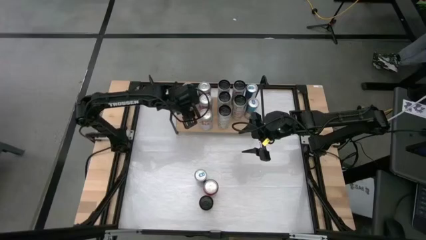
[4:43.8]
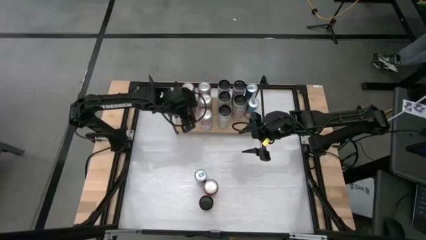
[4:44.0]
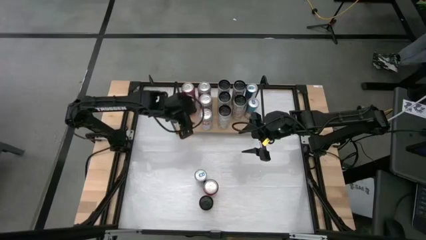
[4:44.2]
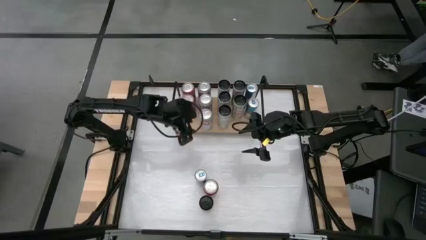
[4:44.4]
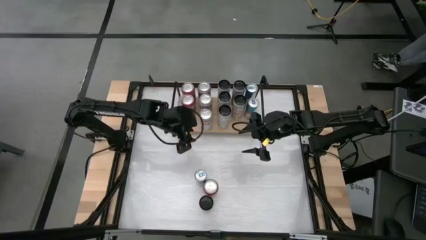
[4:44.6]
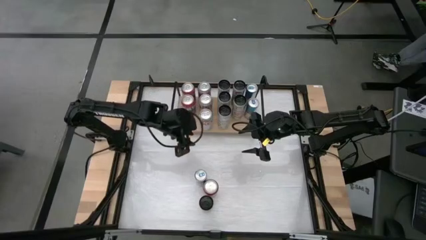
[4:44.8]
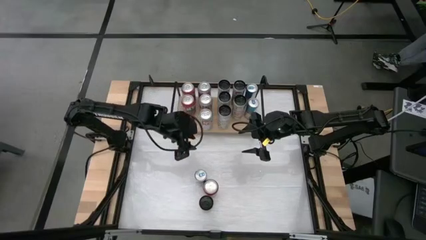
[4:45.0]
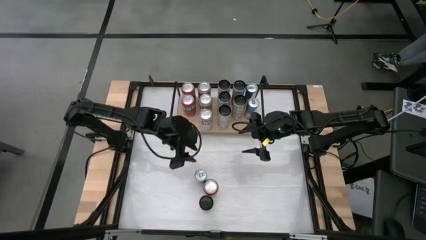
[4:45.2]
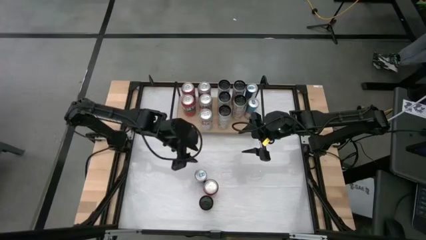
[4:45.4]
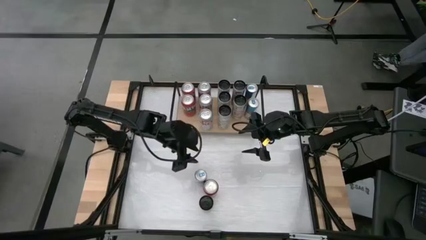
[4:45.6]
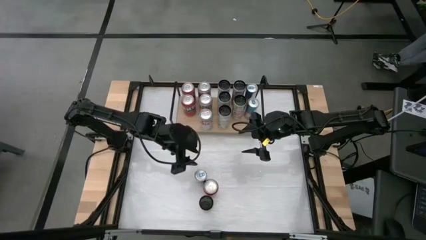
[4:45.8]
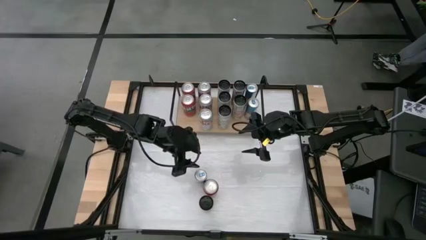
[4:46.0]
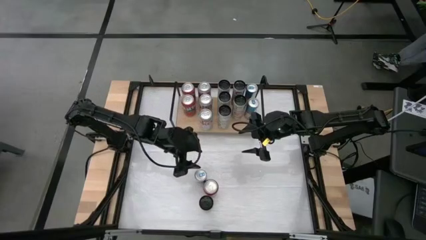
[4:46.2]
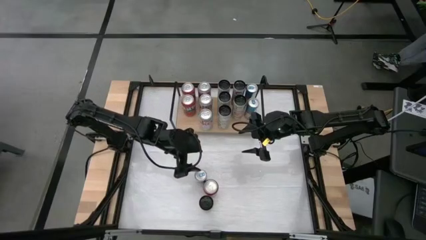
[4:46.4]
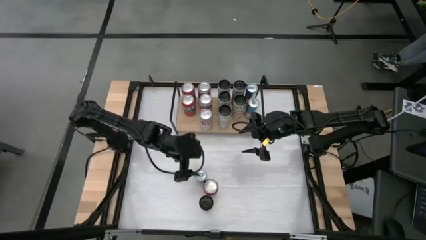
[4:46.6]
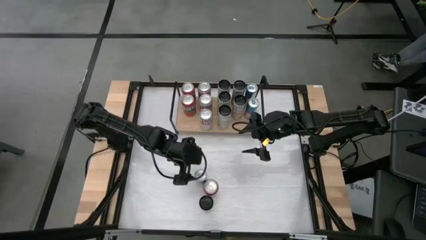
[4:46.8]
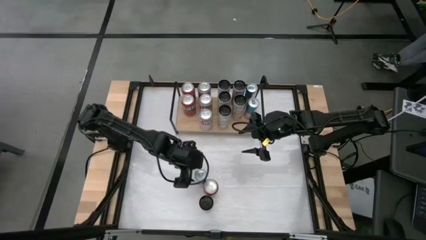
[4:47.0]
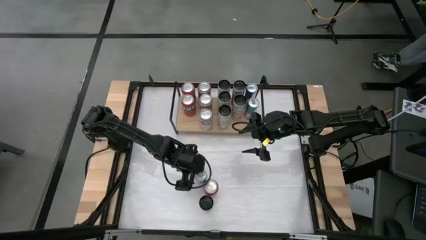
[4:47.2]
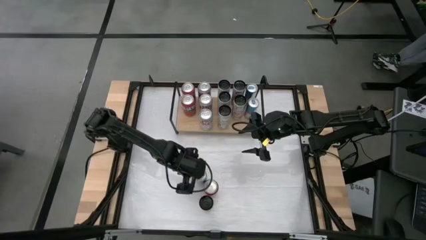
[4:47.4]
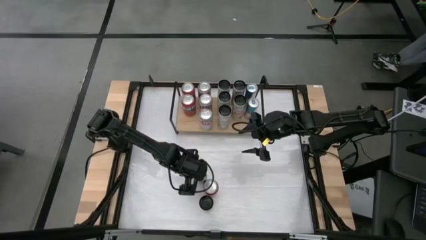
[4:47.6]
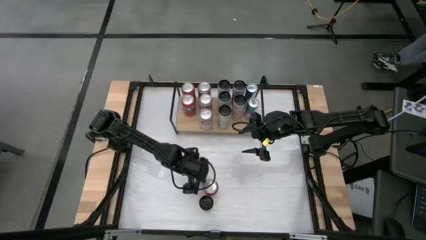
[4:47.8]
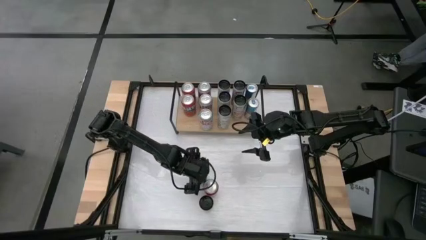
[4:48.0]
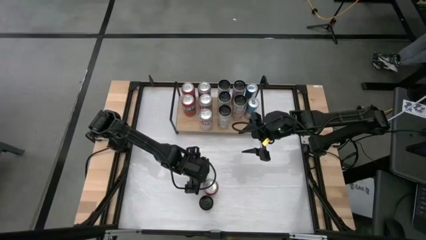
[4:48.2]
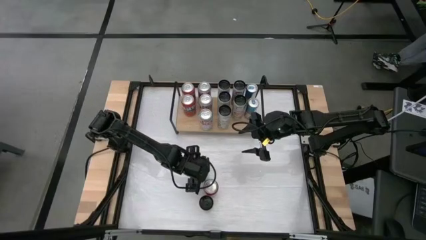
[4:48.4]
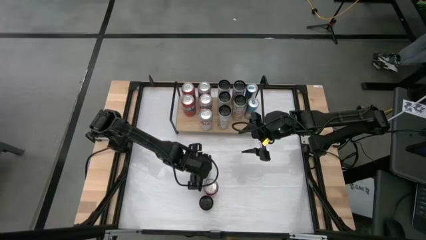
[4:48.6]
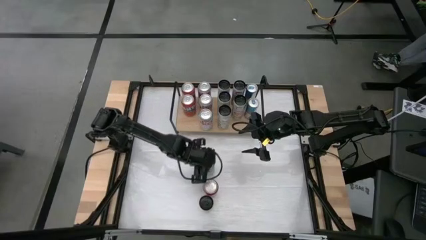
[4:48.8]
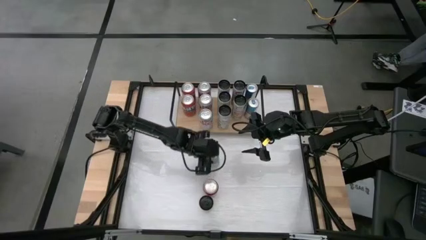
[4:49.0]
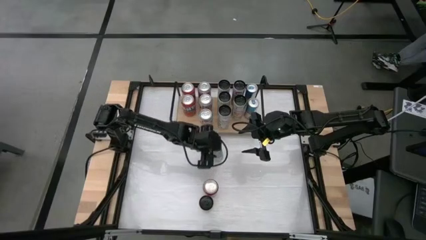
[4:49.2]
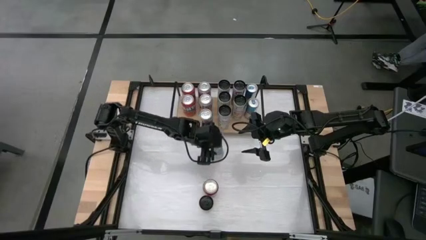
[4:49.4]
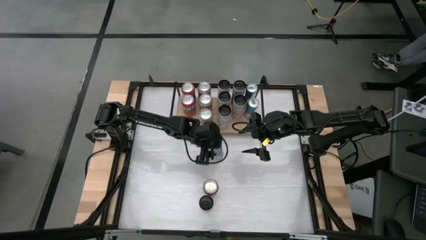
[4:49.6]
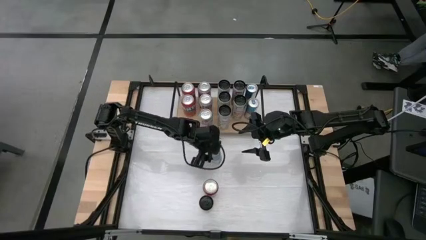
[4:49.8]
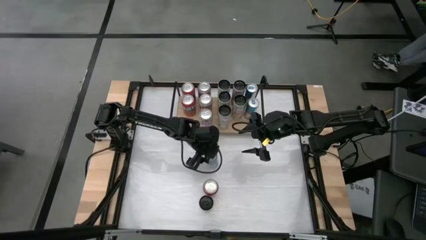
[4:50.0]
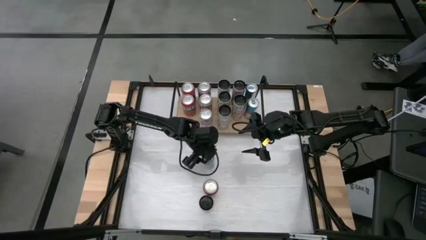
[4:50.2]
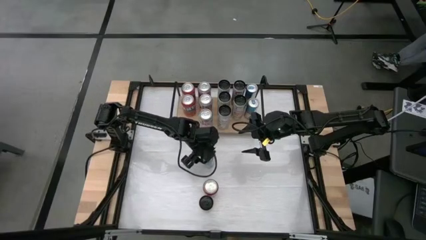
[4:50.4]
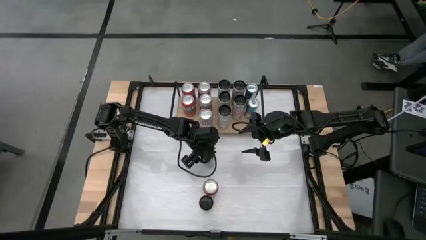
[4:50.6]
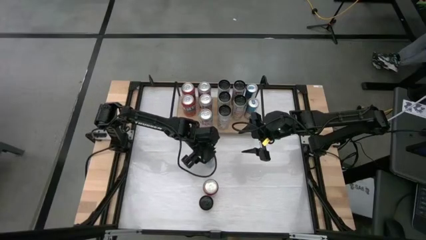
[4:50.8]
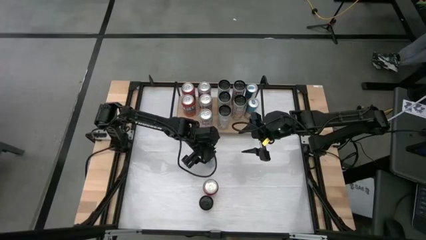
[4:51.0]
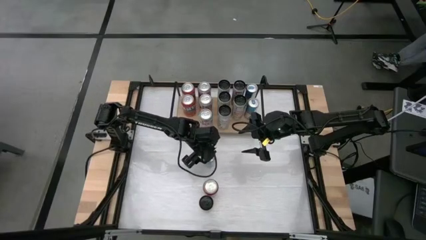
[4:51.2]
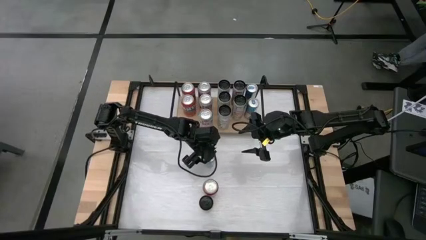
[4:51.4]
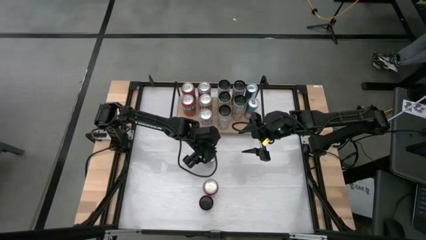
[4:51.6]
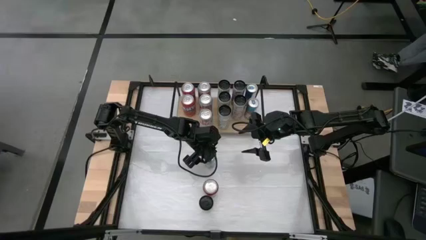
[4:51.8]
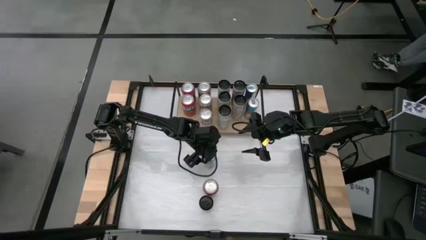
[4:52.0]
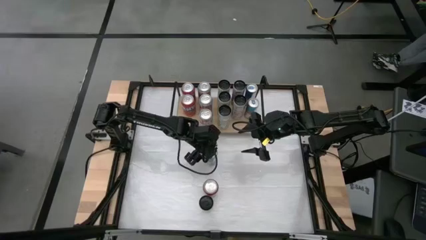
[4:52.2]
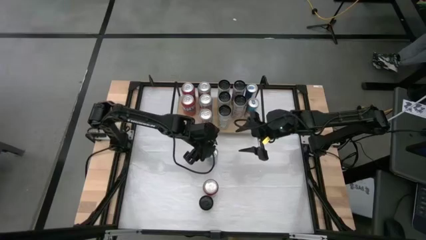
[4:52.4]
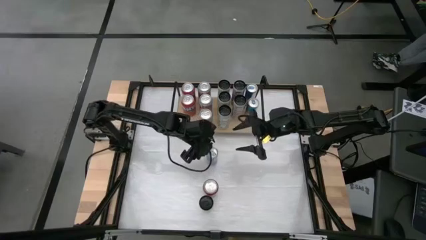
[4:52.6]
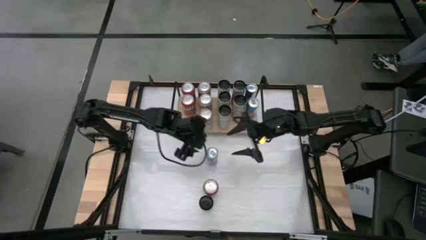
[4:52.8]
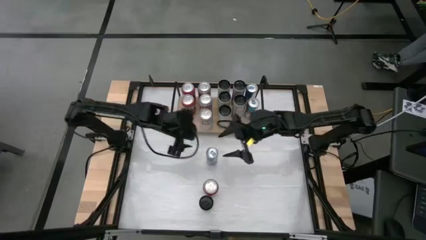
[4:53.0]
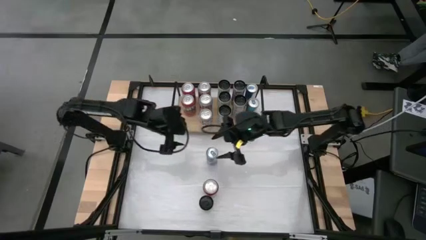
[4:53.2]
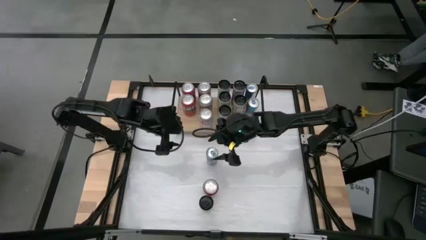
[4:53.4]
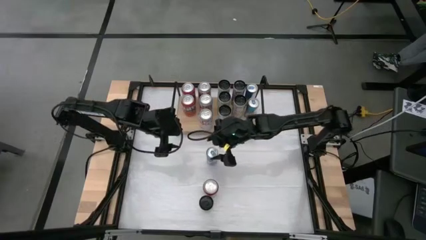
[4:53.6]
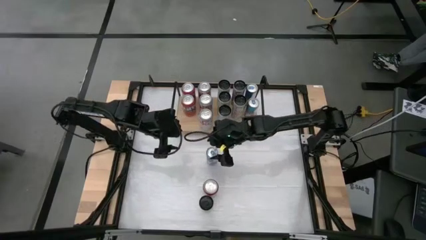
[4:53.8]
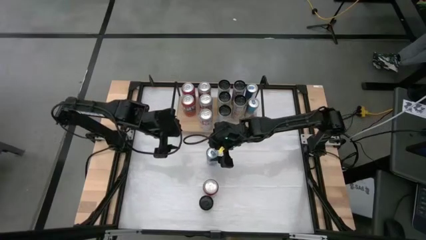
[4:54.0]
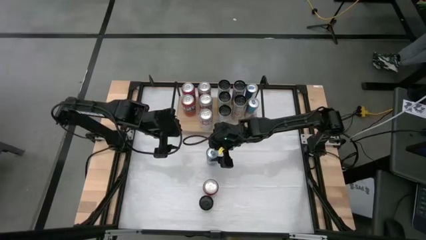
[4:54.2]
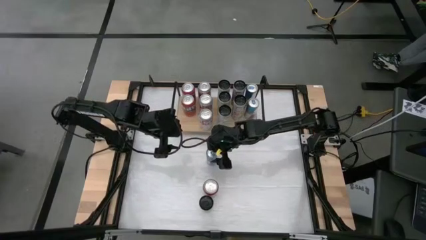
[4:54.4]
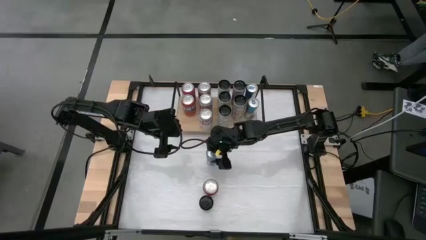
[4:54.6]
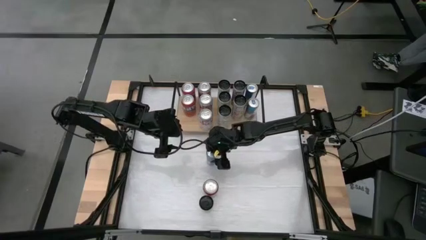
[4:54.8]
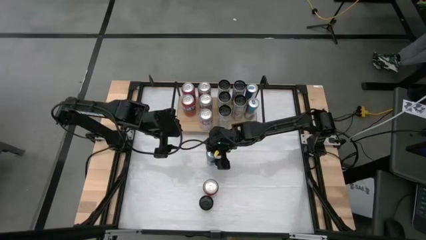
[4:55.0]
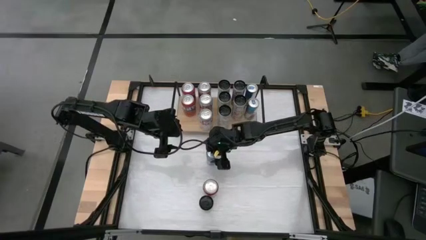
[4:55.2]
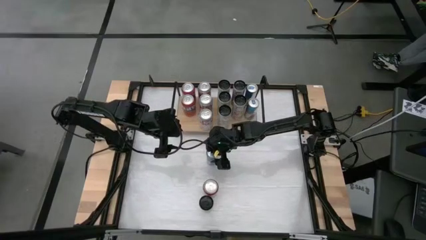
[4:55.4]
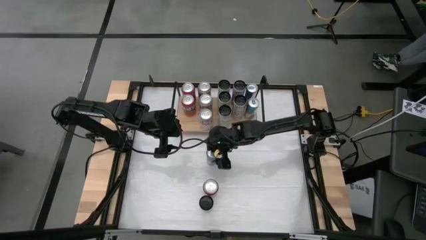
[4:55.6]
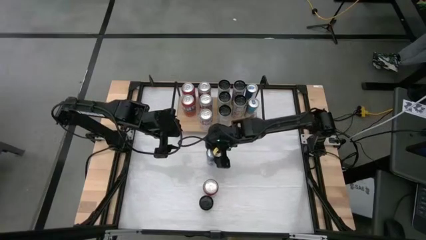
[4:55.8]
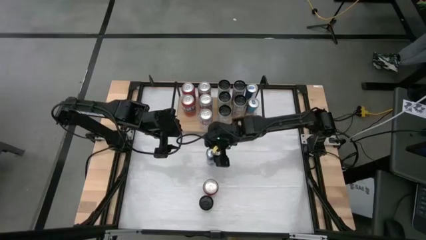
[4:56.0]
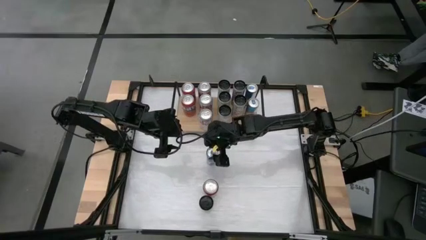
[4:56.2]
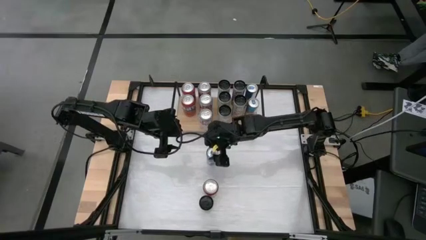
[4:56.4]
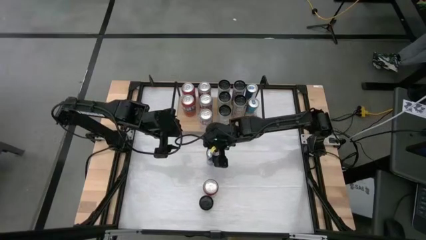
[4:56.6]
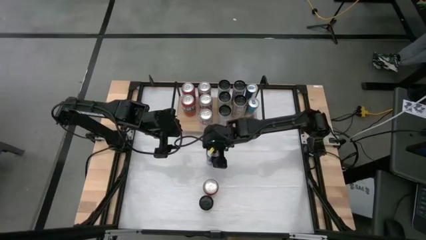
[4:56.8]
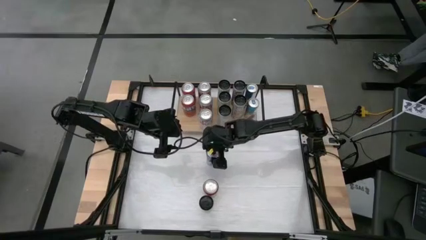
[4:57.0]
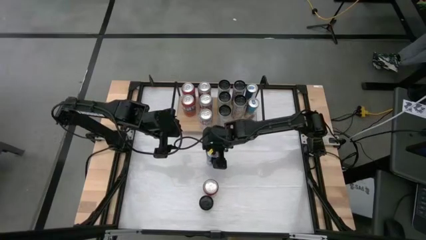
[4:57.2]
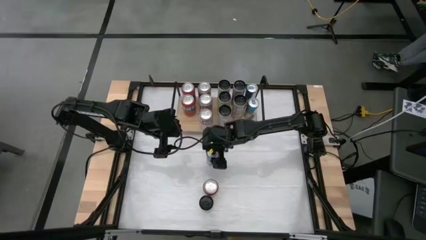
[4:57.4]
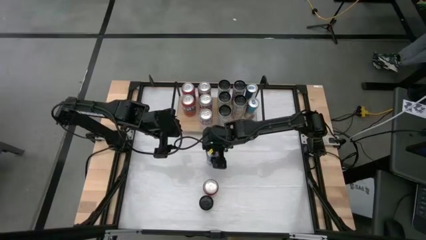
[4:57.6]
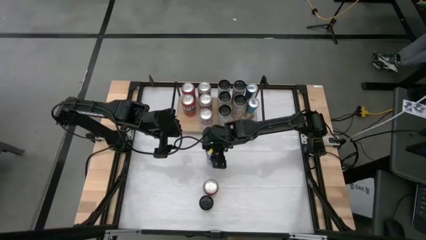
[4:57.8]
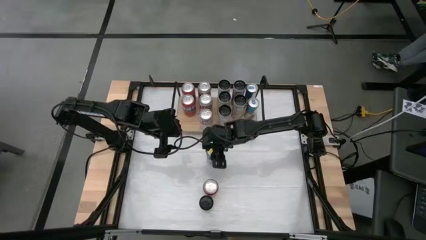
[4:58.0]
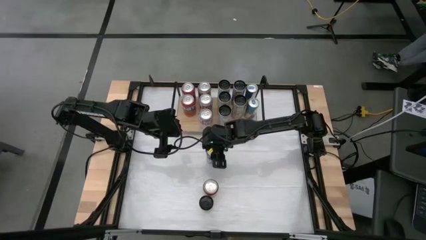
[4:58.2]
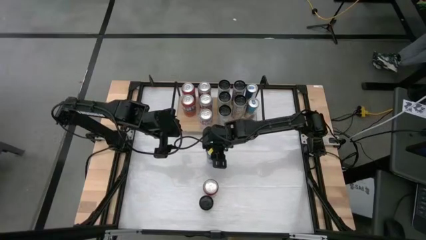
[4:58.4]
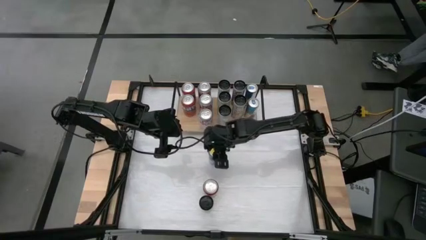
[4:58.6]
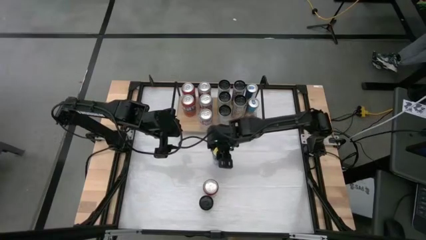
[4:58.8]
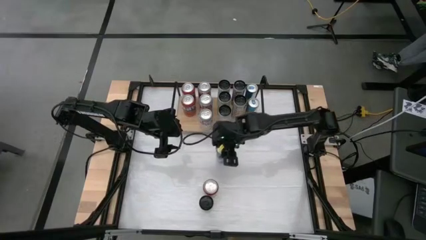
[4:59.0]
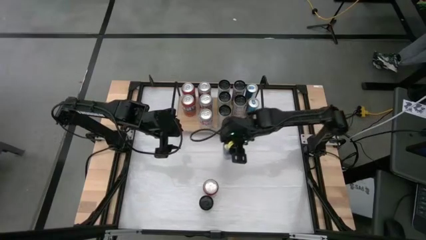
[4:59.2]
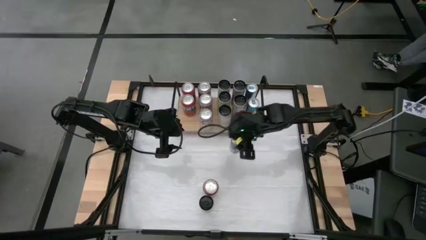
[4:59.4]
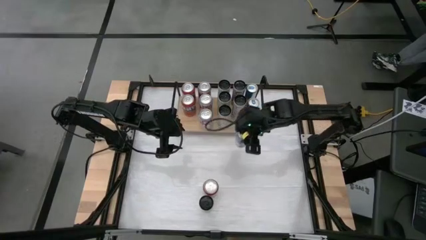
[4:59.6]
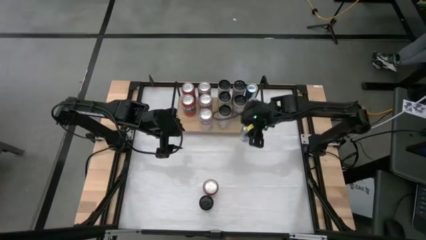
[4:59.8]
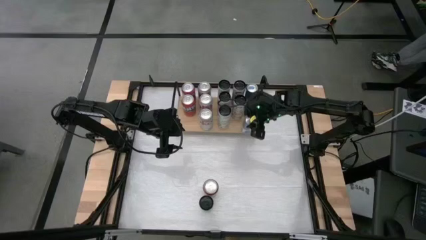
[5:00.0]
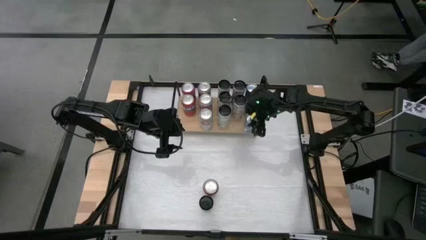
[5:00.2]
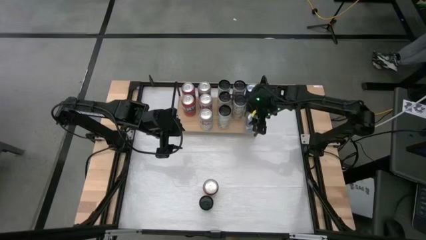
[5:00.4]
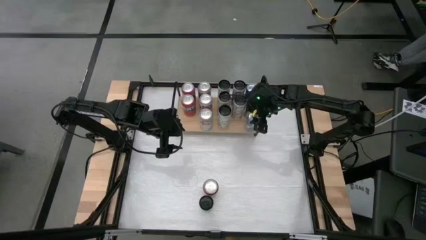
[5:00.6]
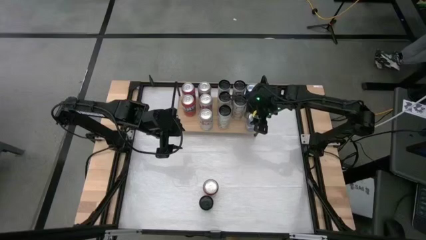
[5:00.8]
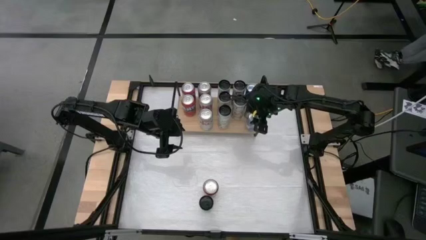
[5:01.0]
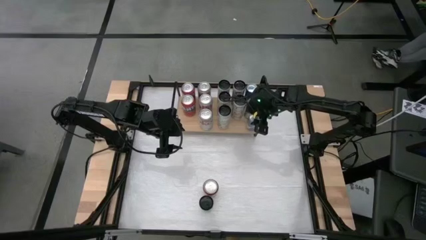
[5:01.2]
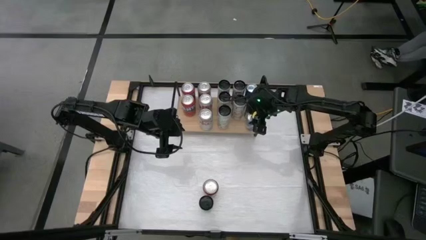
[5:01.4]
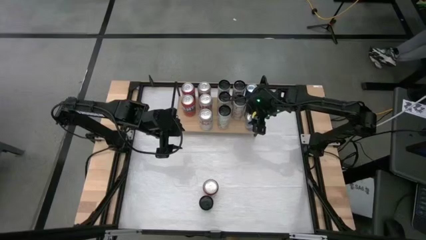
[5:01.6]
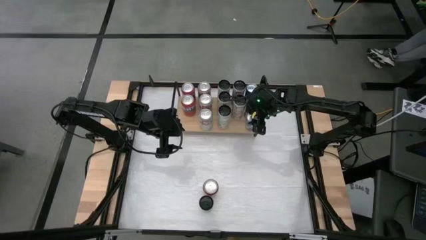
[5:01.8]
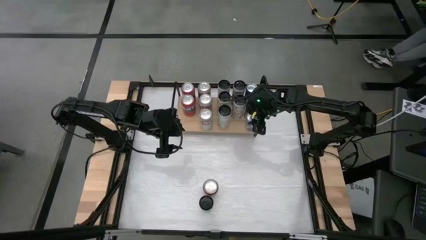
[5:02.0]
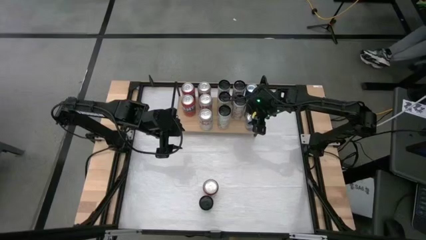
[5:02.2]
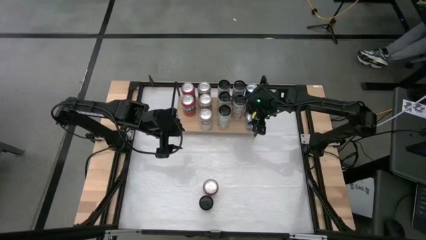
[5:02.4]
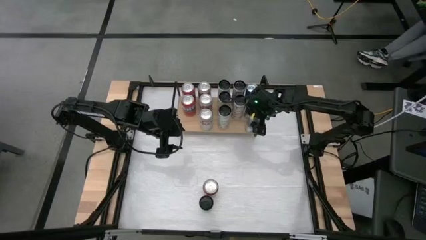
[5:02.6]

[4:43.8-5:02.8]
Task: Place canned beverage on shelf
Put the blue soda can onto the shelf aligned with the other blue soda cans
